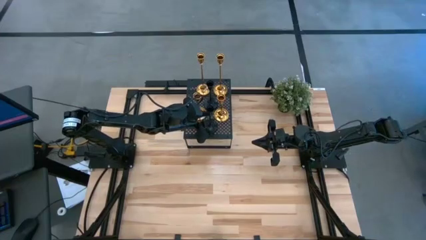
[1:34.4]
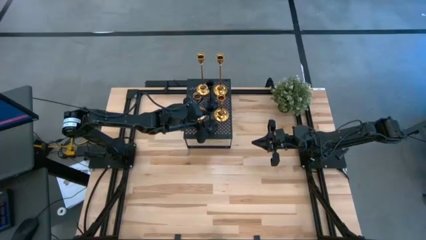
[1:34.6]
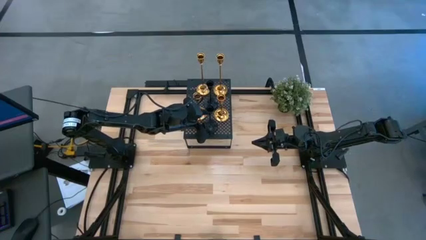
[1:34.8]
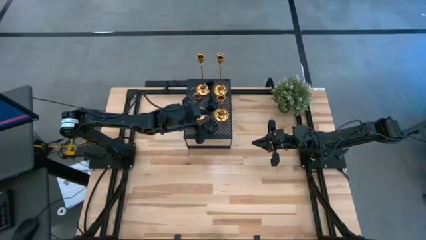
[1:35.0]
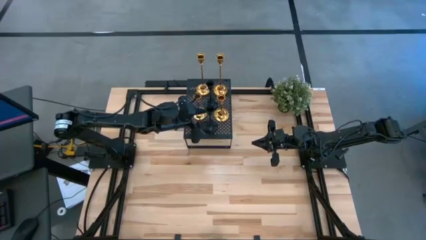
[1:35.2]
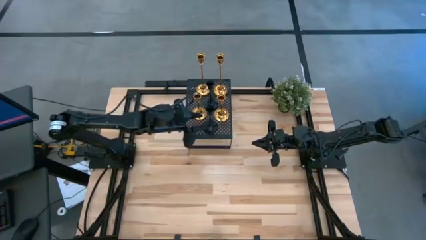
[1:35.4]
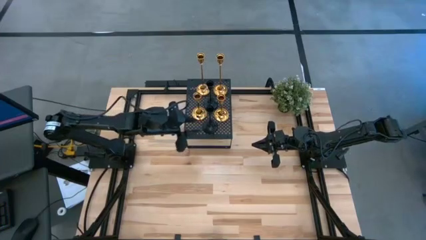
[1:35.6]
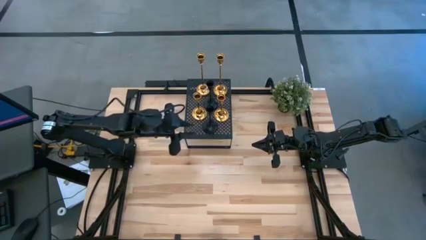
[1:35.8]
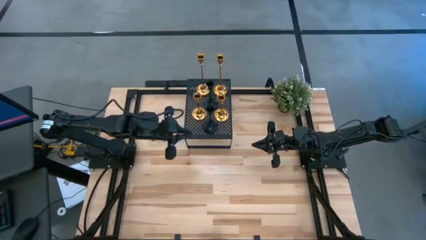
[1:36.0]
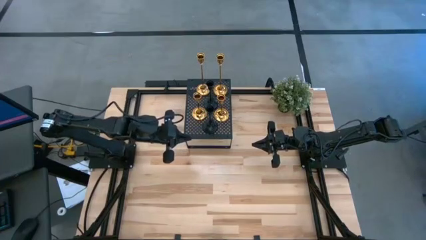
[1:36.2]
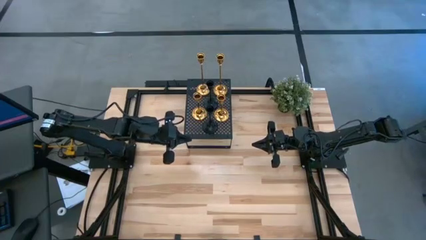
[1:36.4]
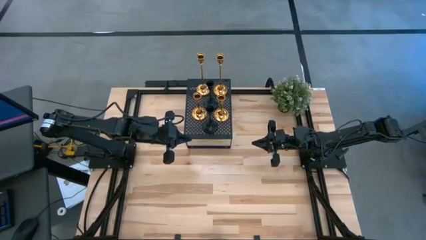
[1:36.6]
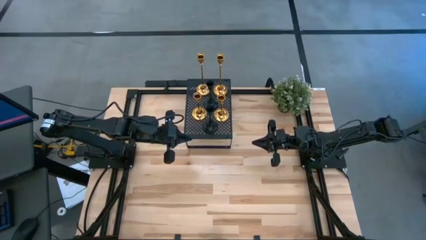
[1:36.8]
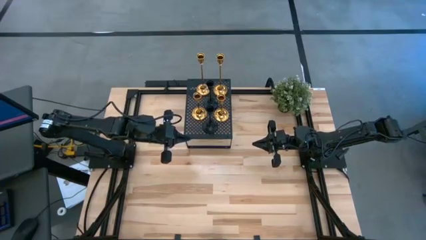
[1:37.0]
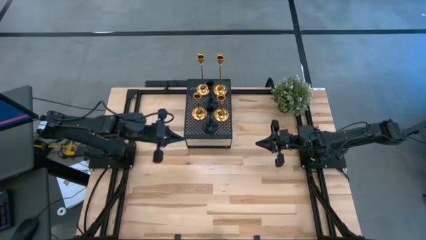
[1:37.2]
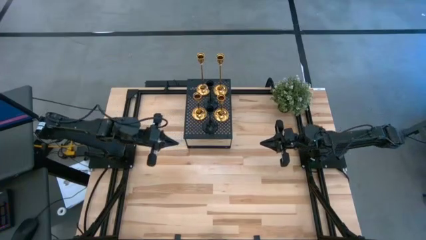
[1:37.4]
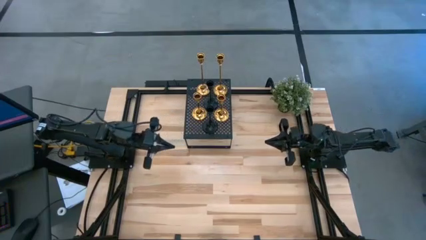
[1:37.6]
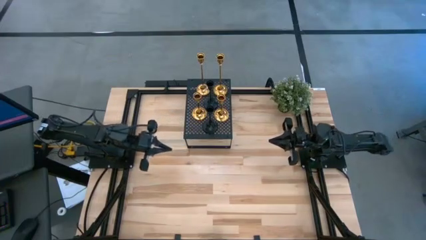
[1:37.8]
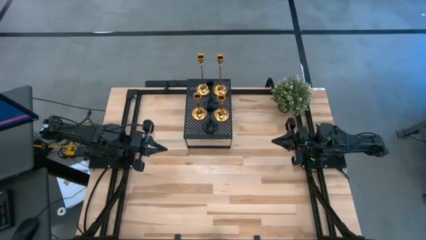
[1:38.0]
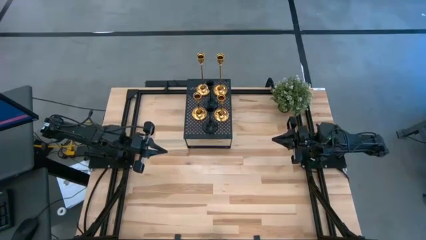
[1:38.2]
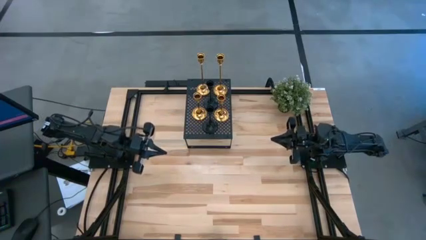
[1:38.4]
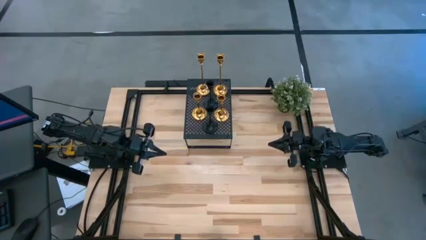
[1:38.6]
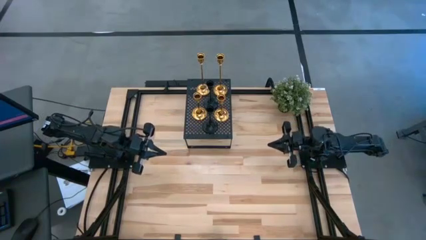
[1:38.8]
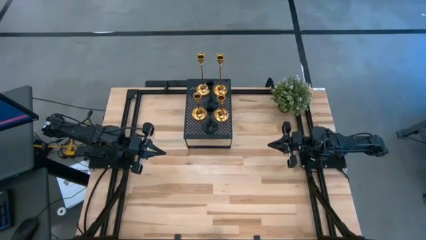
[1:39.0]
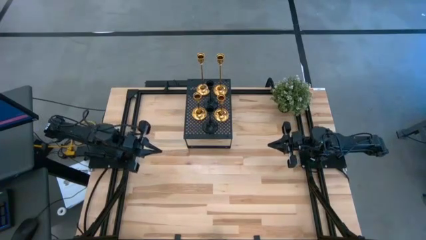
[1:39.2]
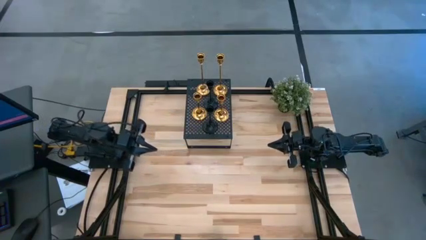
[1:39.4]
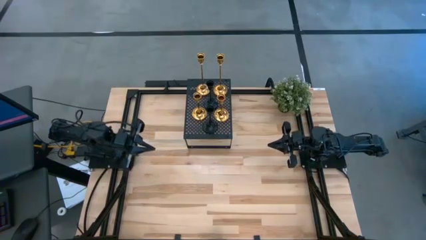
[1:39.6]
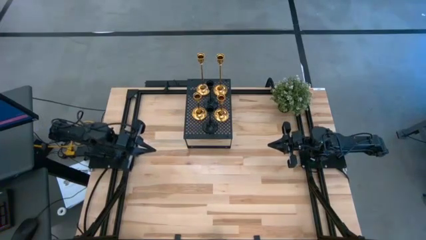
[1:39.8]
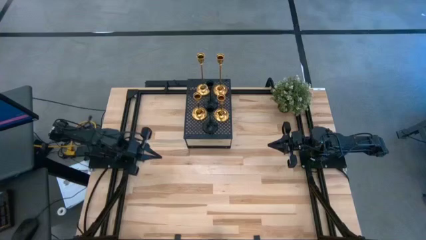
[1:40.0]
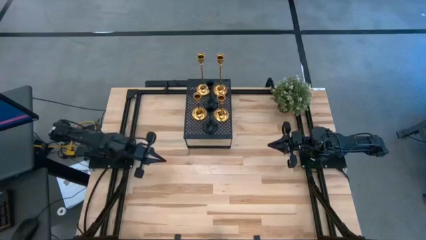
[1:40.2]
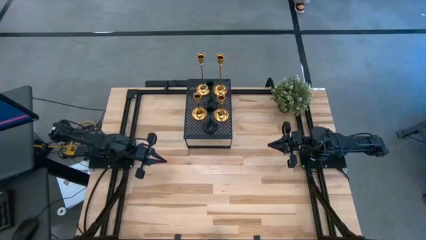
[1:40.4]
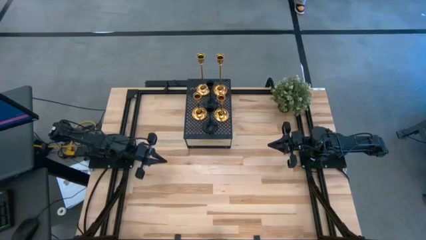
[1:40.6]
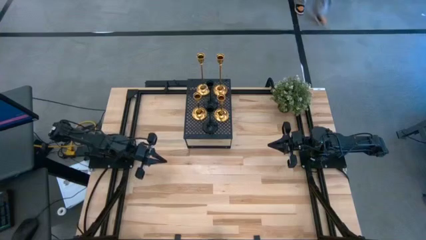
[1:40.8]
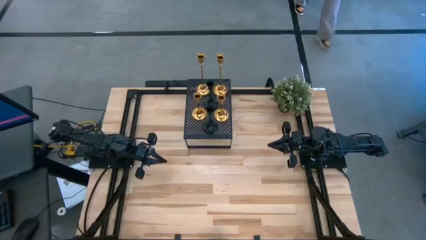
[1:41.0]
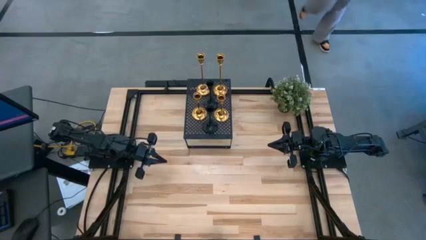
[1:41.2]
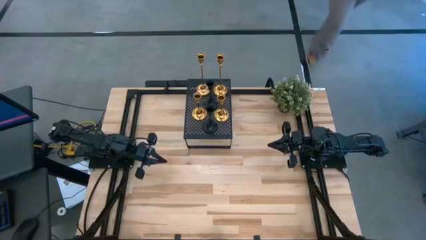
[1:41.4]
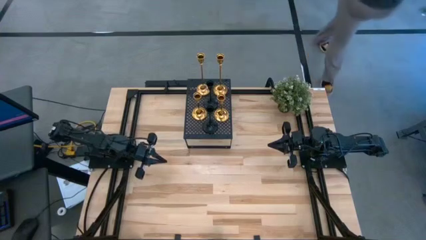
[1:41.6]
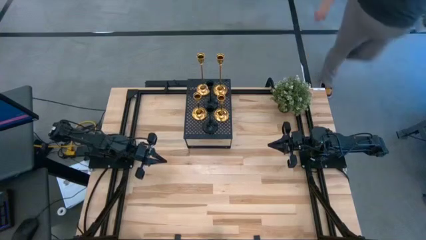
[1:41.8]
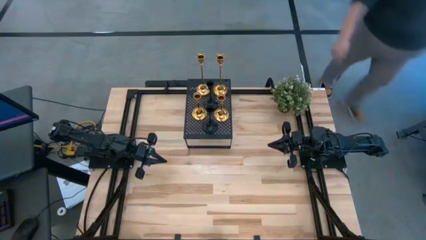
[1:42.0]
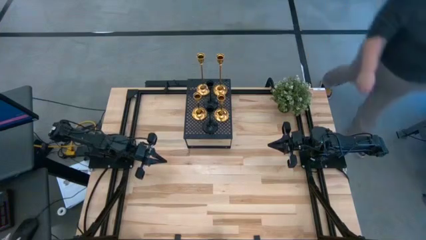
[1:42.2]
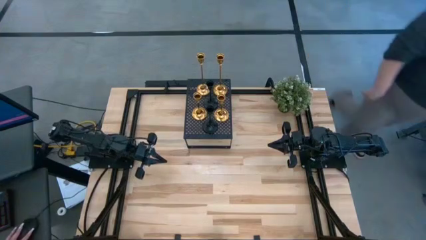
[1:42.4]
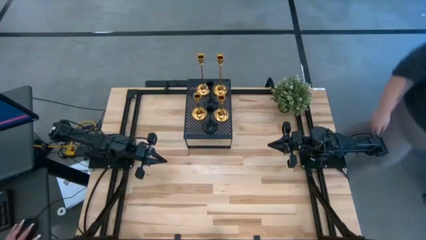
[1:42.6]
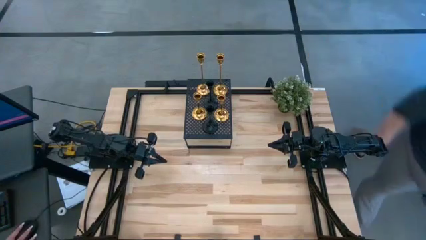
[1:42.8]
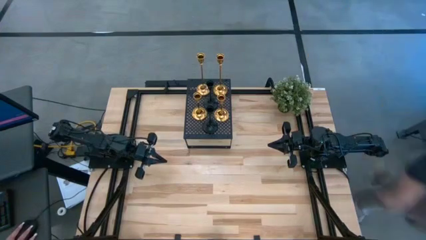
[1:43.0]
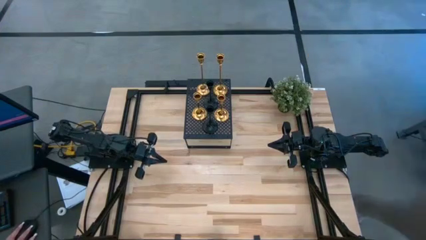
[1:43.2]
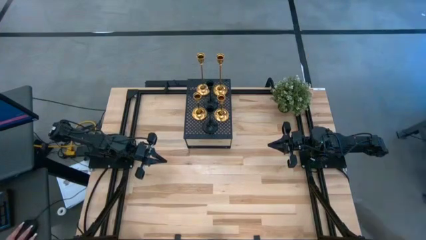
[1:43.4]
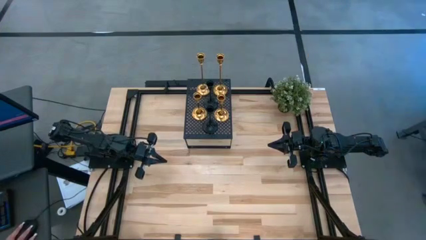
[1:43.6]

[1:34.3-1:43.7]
Task: Pick & Place candle stick holders
Return to Home Position

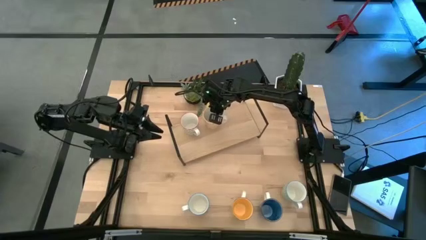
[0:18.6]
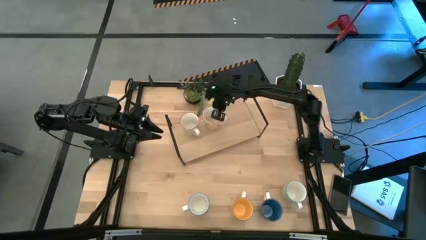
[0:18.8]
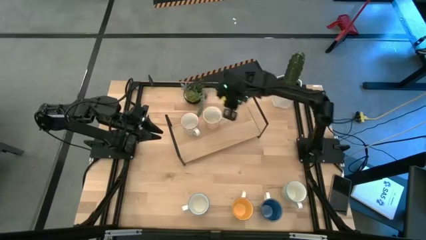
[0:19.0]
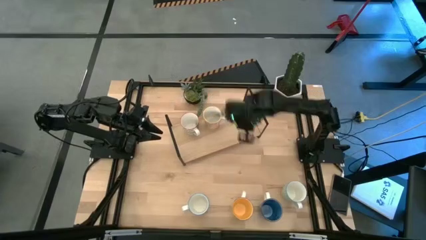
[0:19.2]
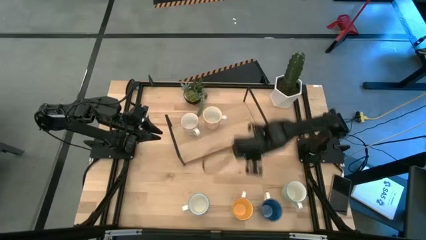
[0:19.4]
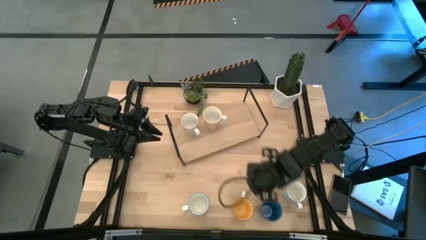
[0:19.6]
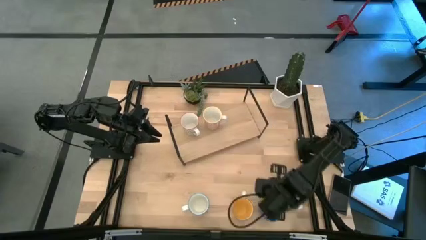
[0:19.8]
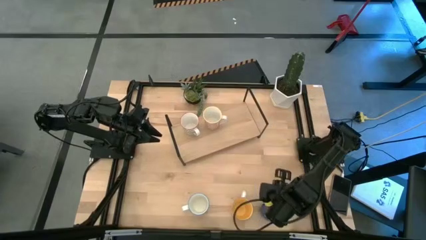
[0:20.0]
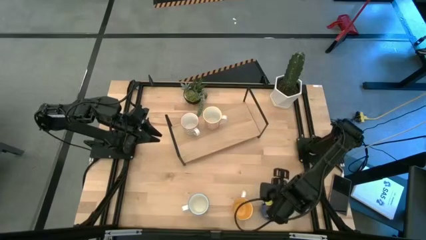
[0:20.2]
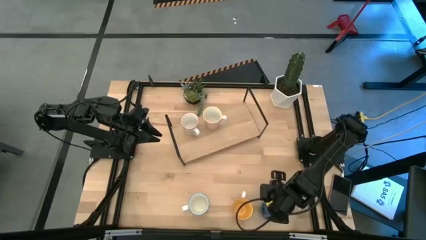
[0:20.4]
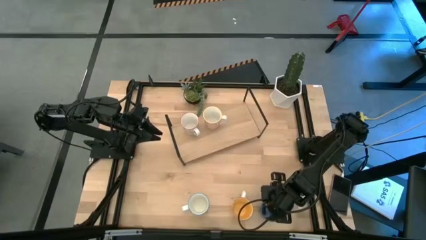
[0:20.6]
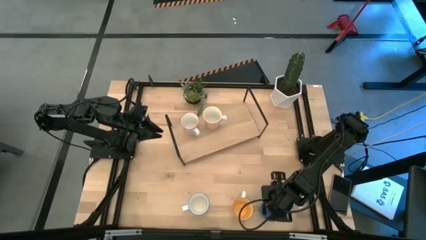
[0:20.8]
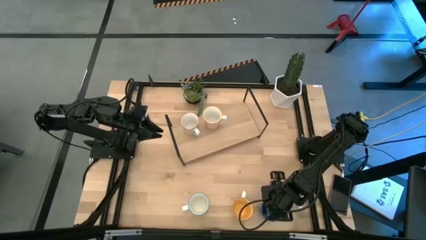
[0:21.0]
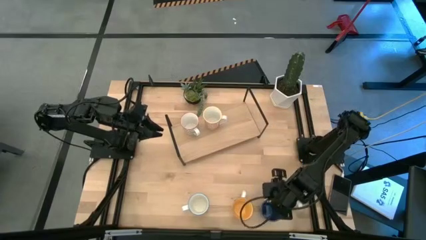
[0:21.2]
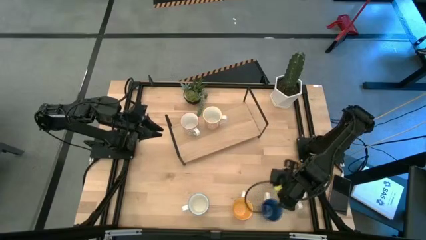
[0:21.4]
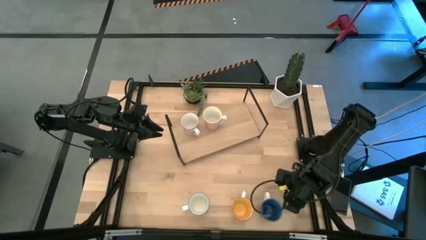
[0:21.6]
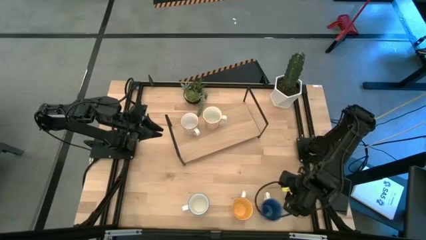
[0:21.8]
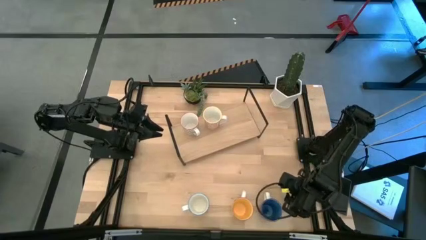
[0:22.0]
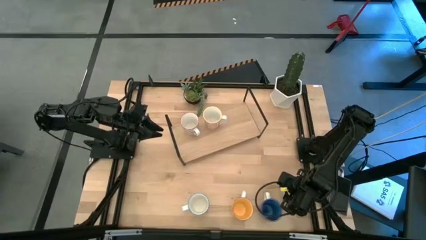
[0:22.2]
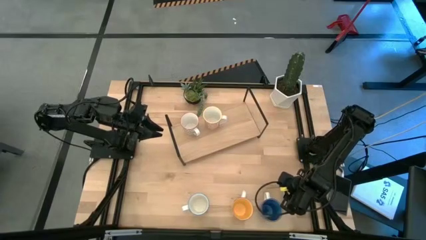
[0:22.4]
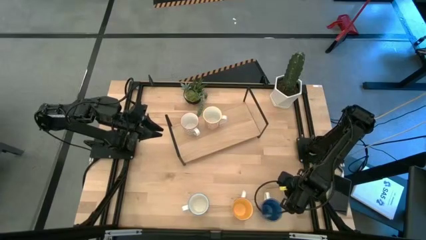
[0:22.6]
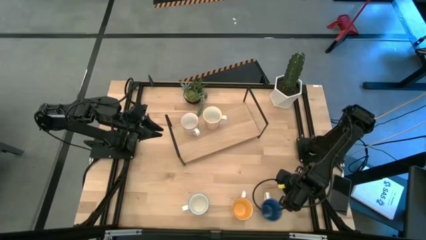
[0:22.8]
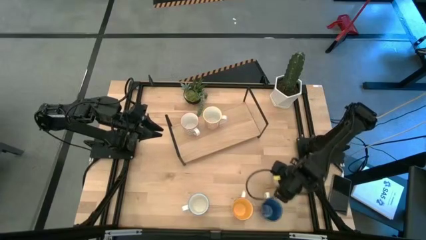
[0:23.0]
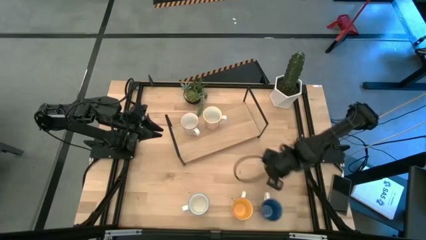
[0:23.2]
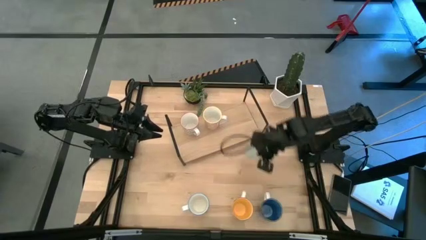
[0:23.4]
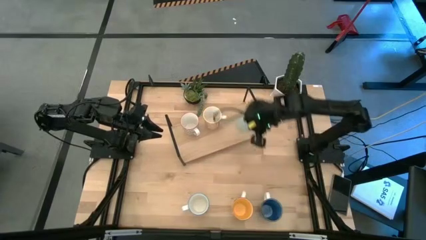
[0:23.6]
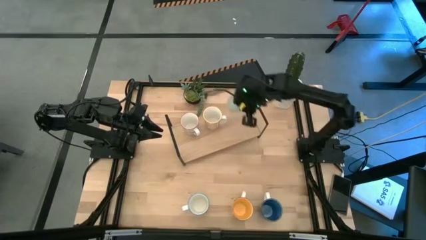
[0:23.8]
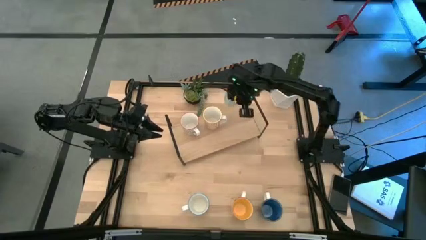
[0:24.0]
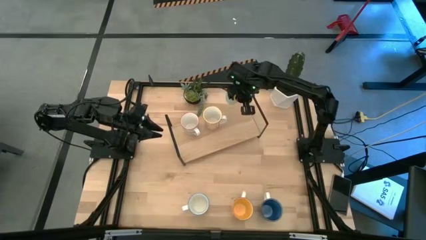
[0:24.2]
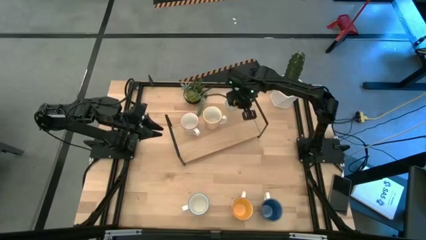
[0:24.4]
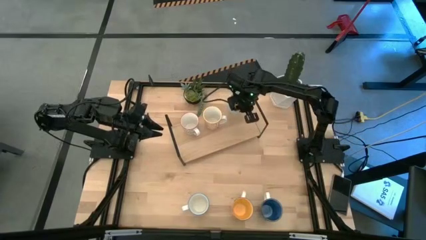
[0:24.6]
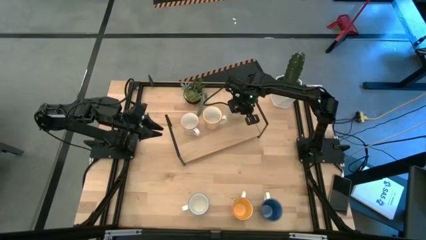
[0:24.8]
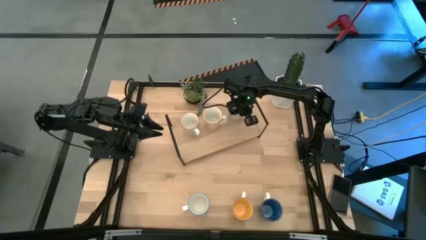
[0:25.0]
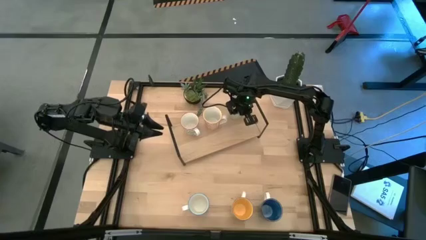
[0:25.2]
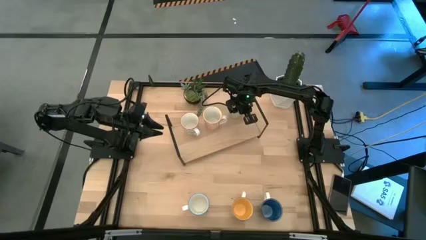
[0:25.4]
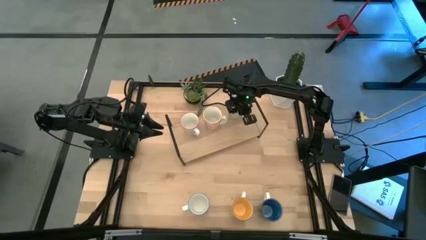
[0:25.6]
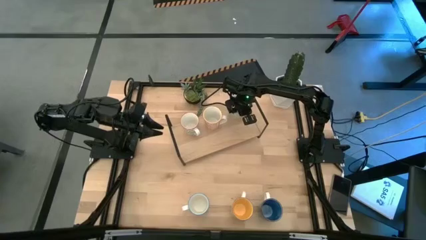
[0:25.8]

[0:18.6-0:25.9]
Task: Place coffee mugs
Put the green patterned mug on the shelf
